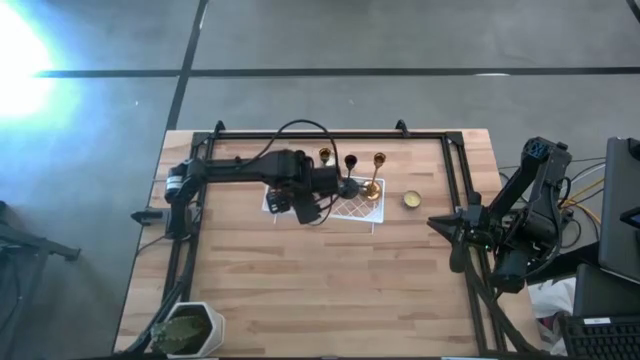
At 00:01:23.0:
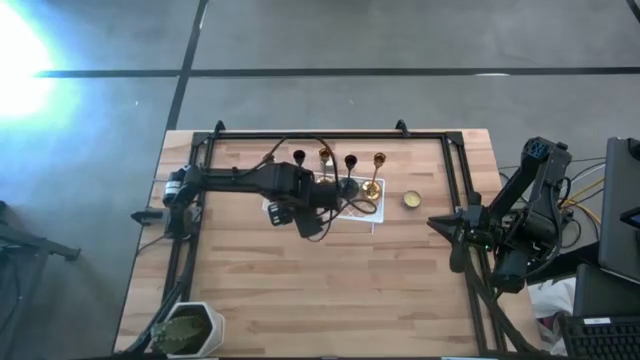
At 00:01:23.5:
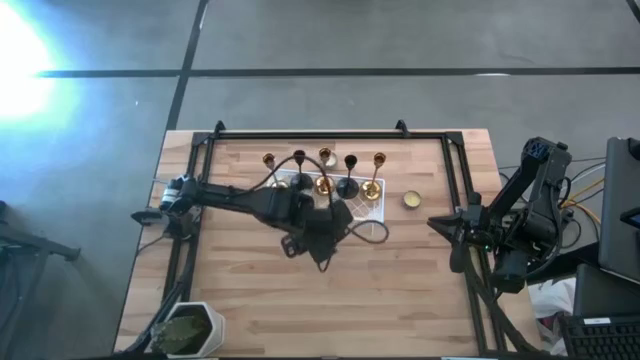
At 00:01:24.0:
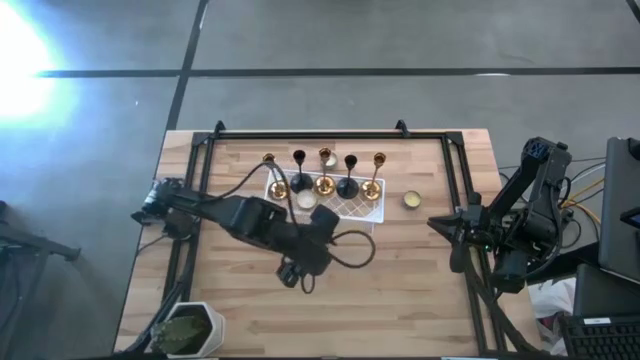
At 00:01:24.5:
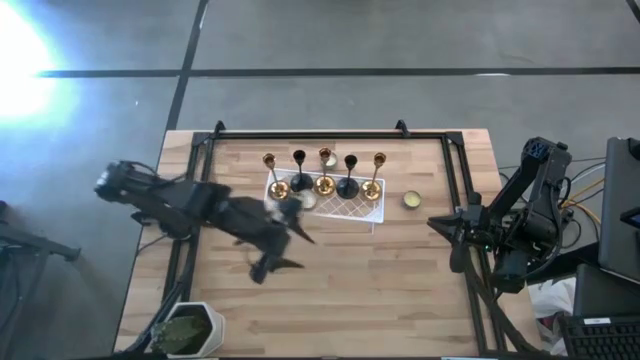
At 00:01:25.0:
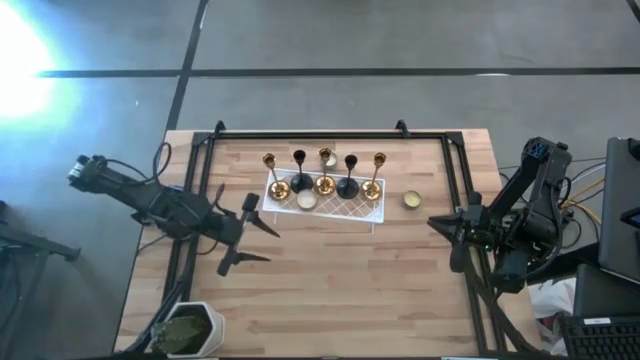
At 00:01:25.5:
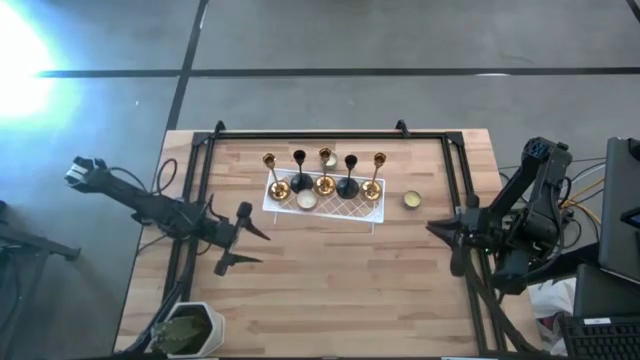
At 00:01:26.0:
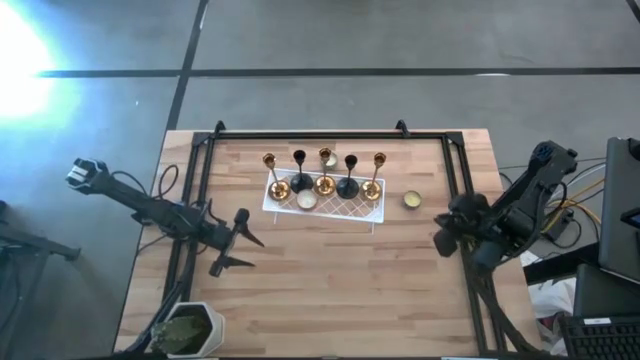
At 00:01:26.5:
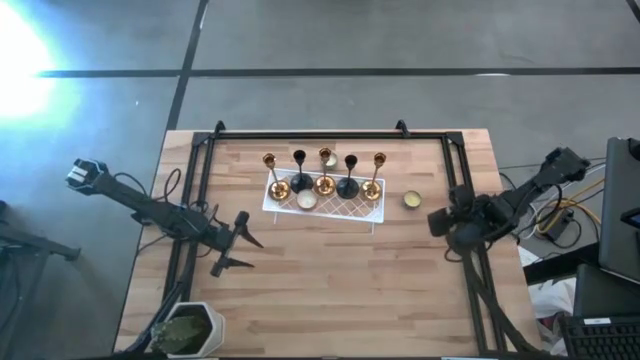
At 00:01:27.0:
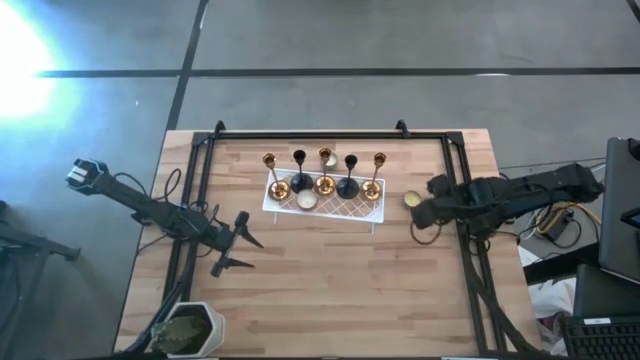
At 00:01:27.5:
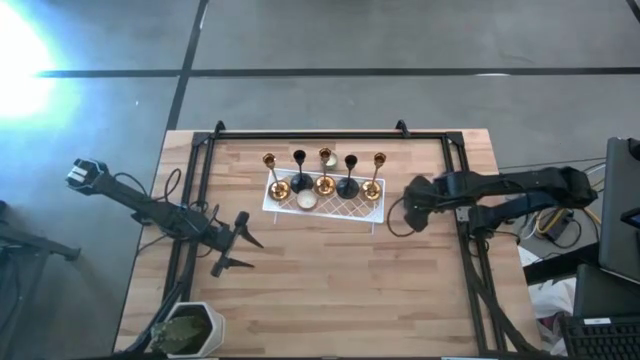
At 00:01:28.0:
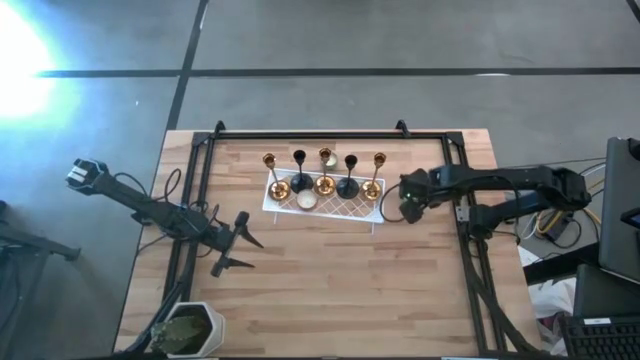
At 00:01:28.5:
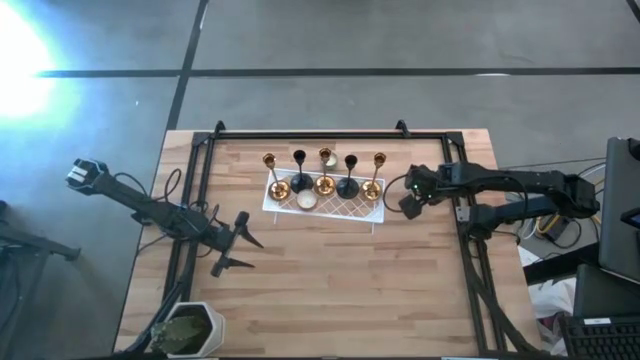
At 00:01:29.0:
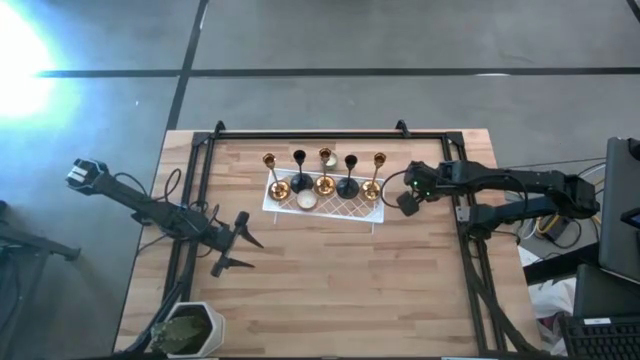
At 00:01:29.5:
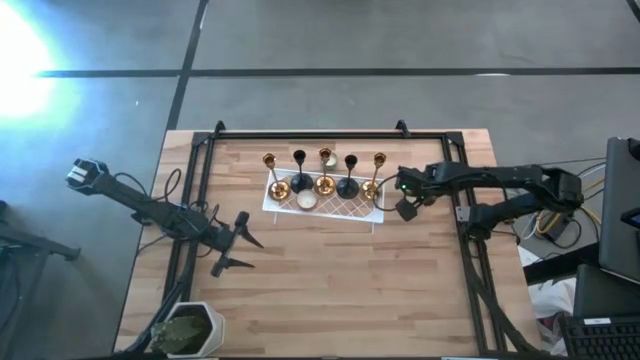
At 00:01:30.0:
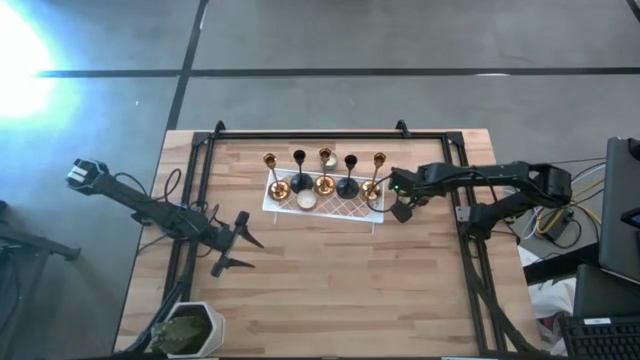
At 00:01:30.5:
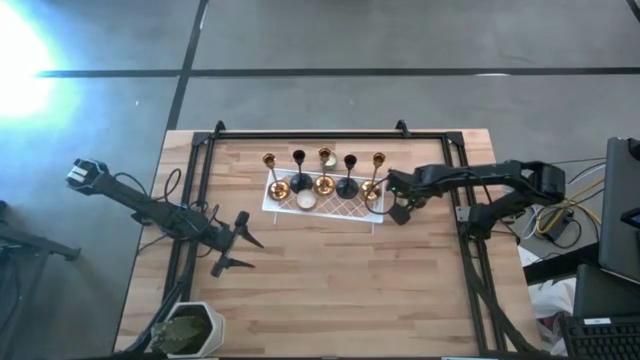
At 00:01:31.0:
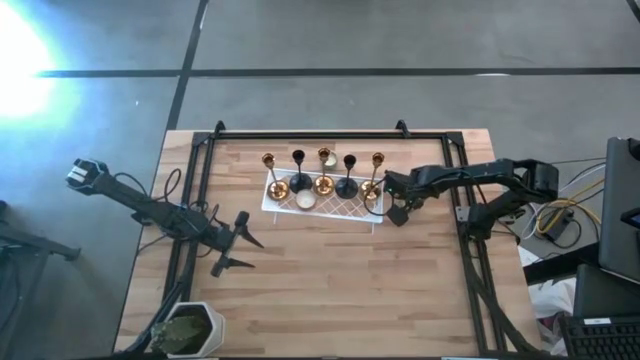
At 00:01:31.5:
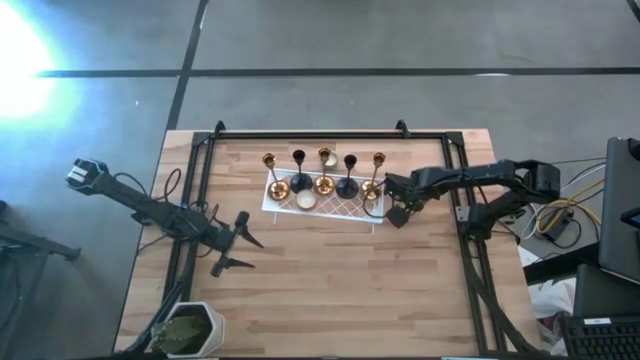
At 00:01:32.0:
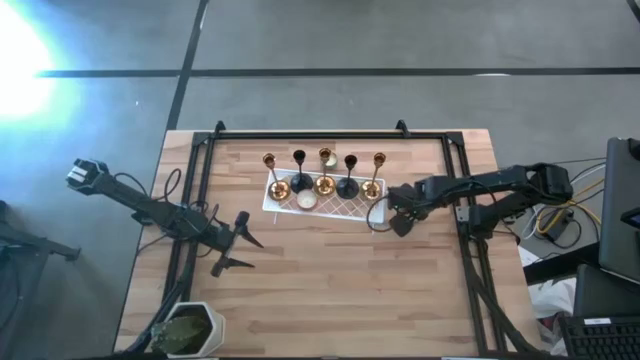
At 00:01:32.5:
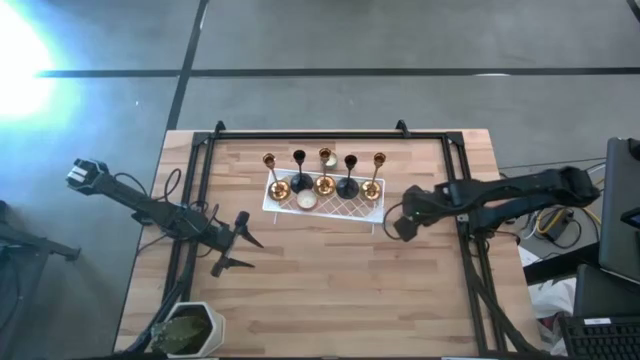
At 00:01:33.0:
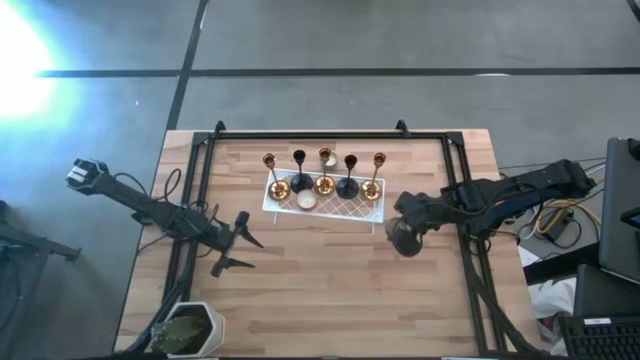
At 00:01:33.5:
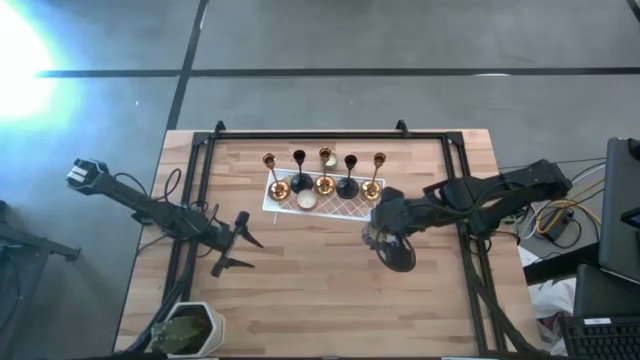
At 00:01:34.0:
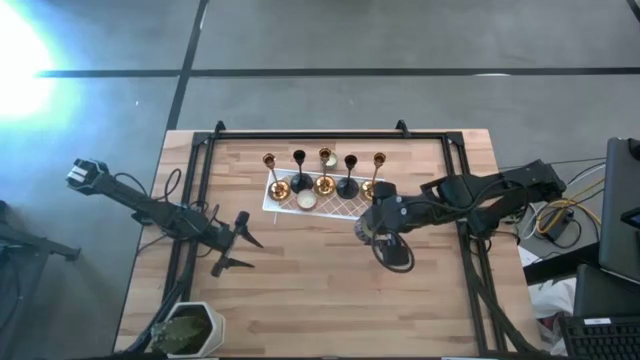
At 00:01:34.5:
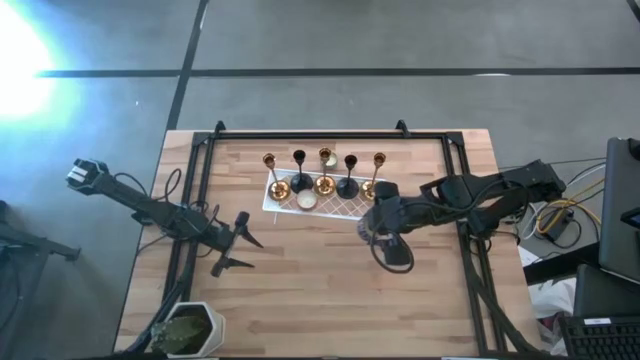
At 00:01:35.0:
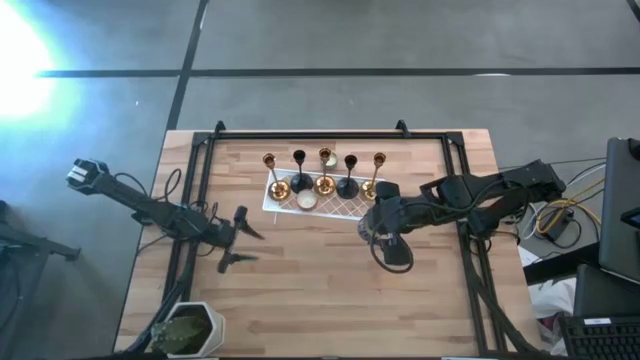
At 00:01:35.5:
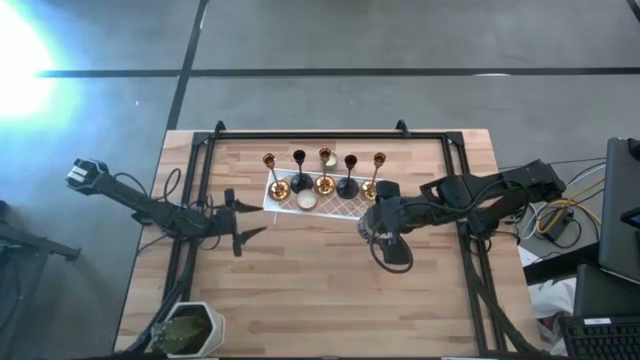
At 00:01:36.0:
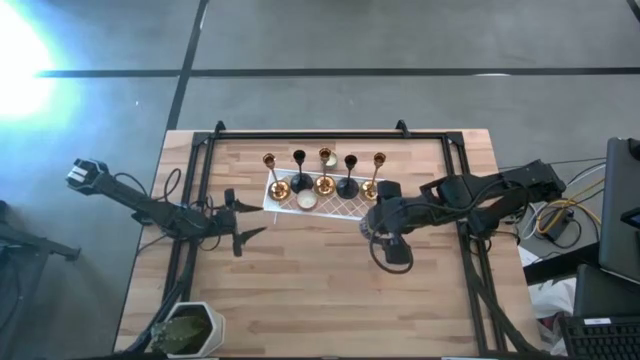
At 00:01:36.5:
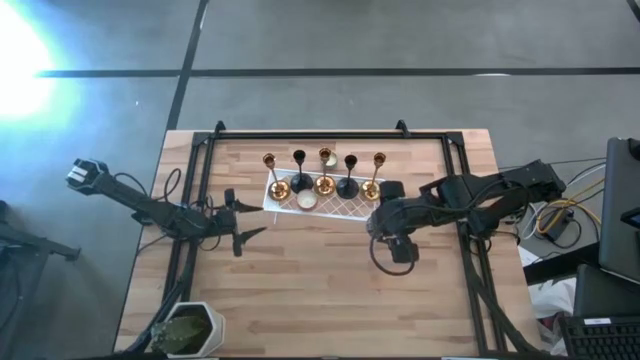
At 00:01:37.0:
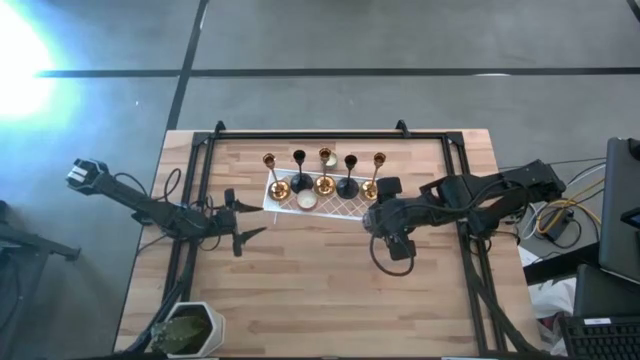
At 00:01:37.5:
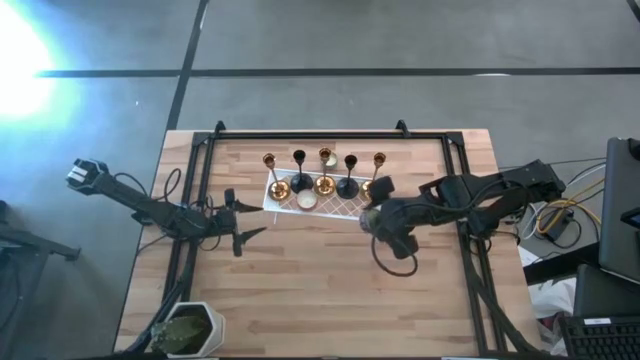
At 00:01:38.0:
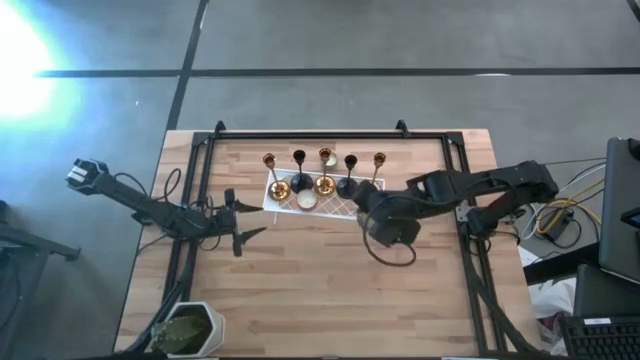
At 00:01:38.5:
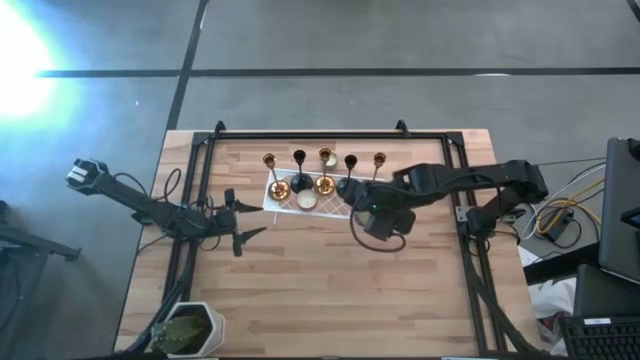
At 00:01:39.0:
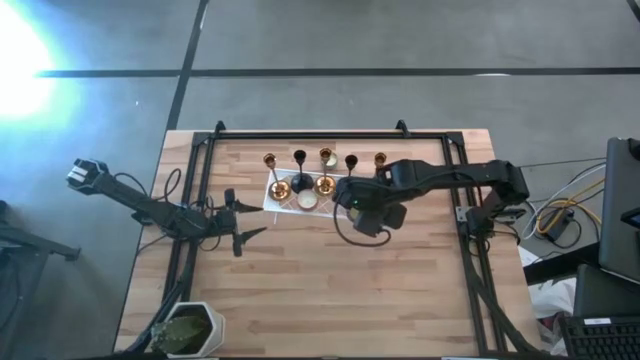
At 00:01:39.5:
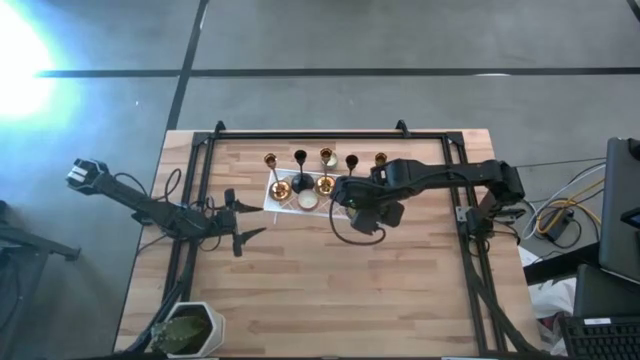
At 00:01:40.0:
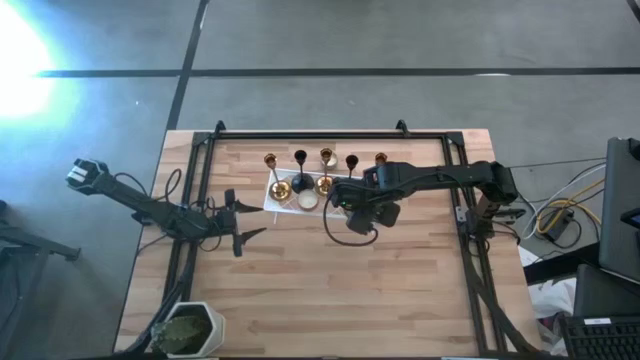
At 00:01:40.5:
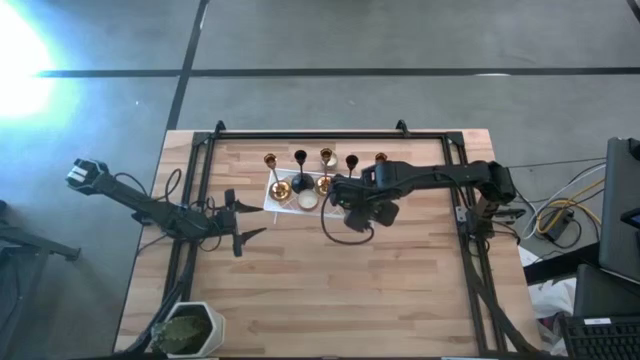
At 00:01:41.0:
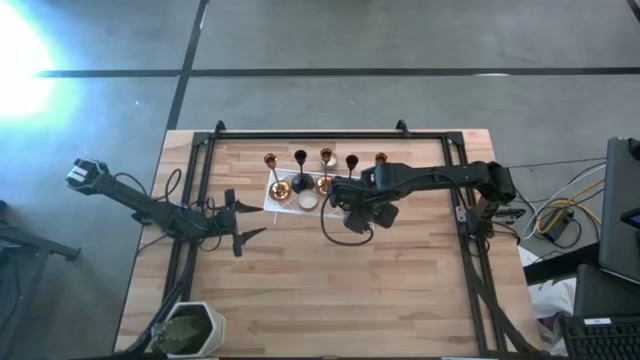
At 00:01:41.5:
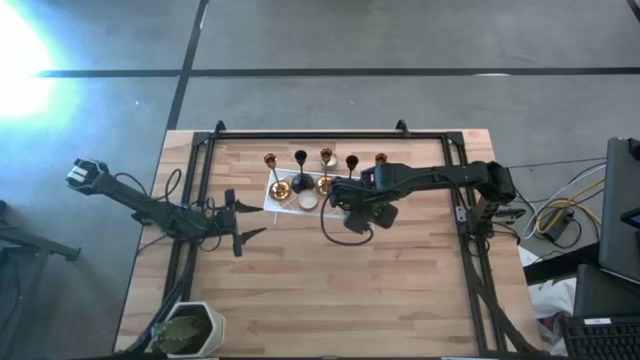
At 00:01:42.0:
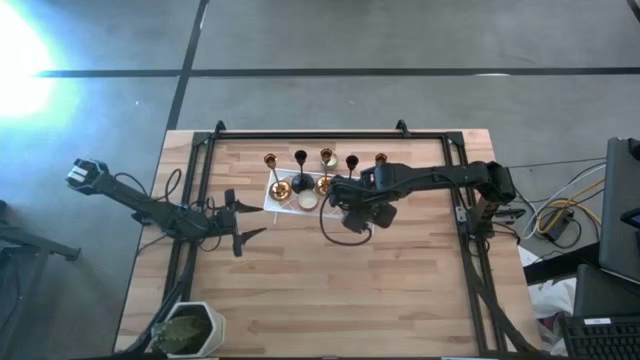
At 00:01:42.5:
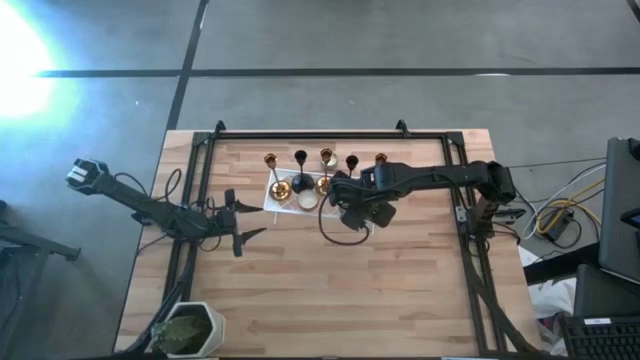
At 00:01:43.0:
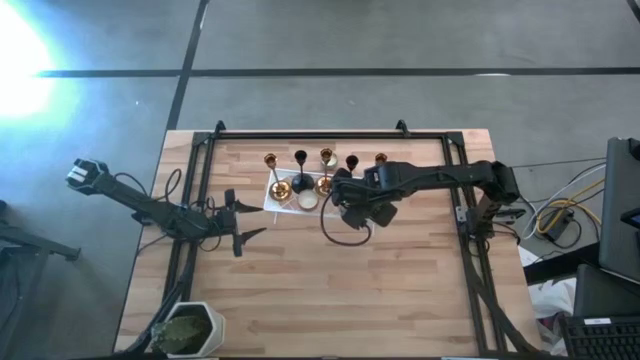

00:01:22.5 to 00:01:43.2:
Task: Pick & Place candle stick holders
Put the blue scented candle on the shelf
